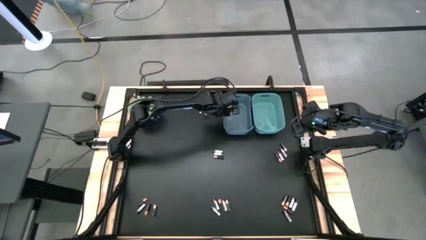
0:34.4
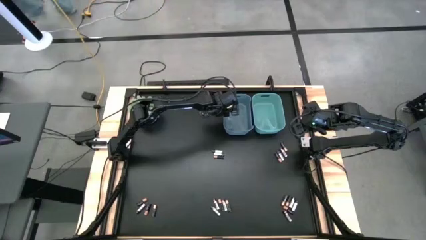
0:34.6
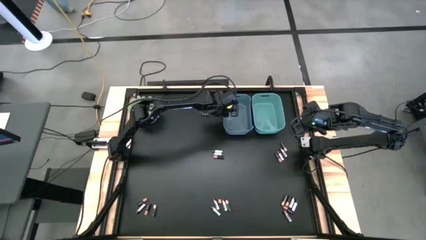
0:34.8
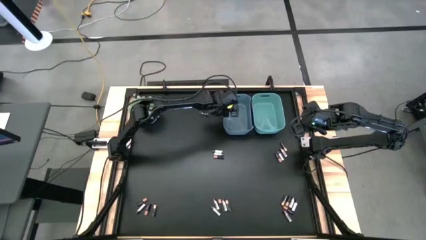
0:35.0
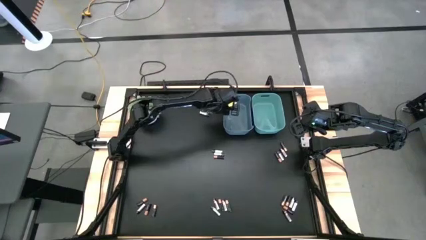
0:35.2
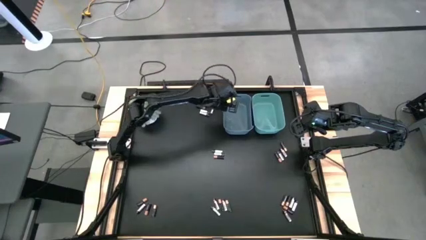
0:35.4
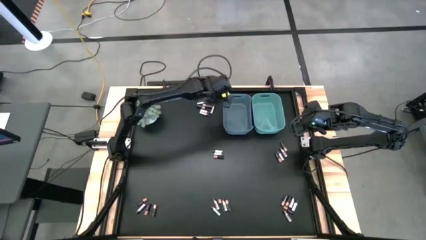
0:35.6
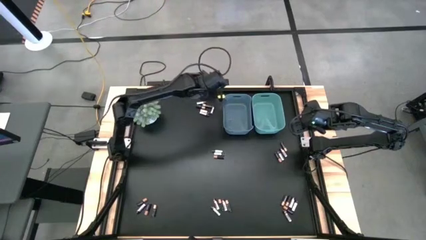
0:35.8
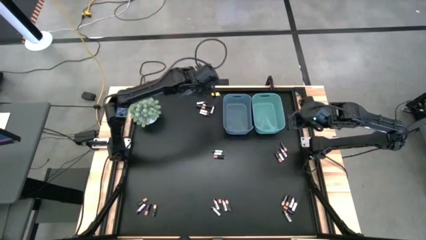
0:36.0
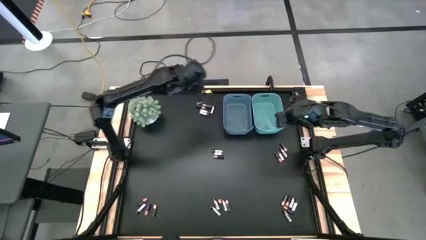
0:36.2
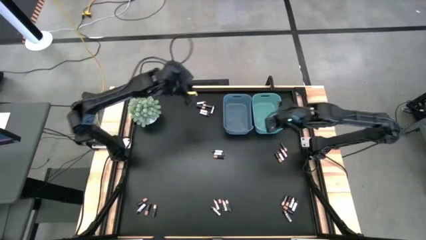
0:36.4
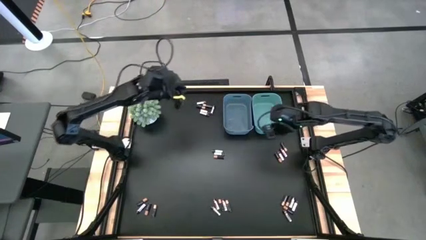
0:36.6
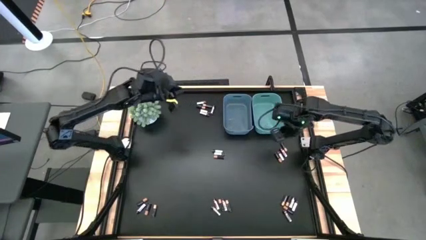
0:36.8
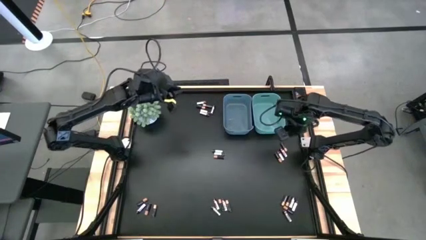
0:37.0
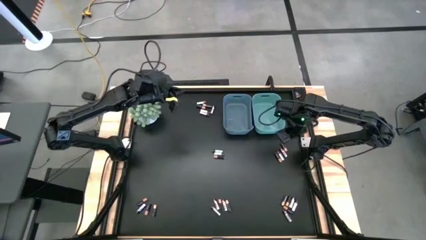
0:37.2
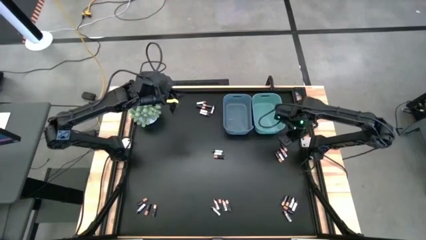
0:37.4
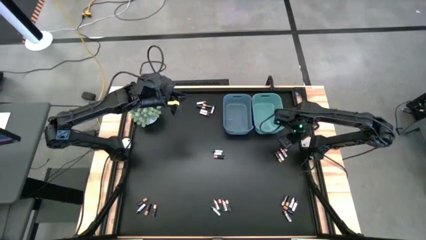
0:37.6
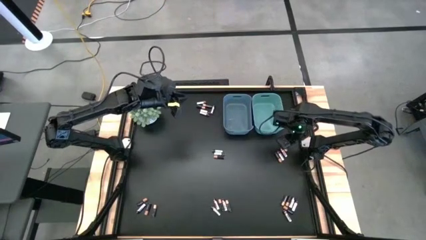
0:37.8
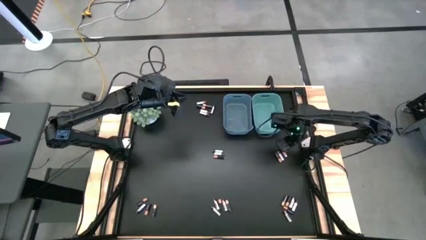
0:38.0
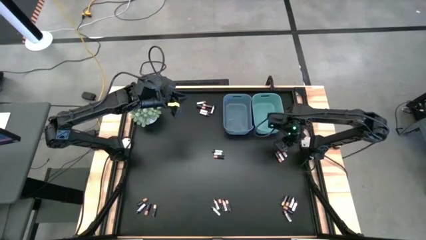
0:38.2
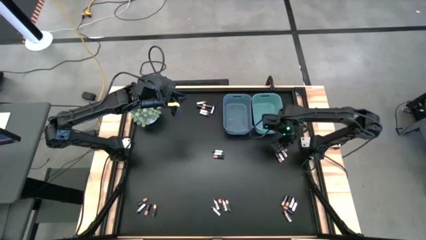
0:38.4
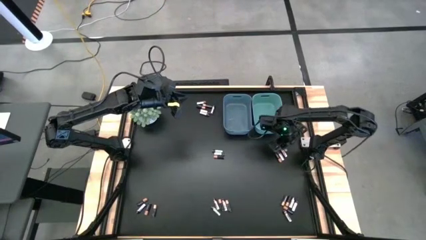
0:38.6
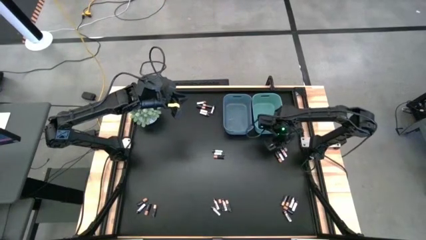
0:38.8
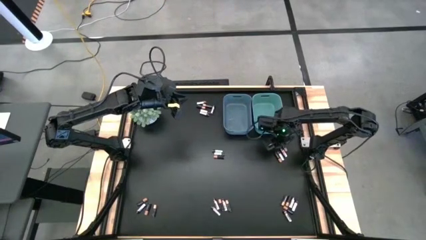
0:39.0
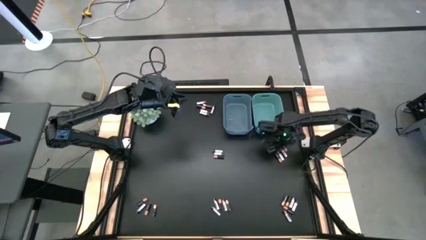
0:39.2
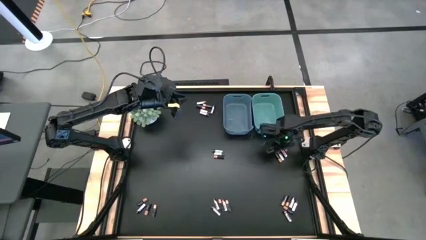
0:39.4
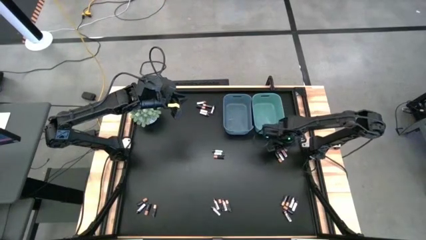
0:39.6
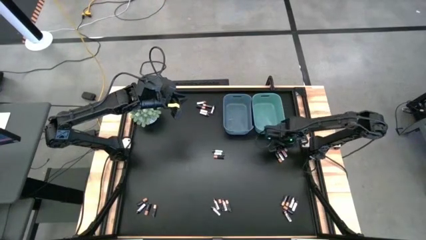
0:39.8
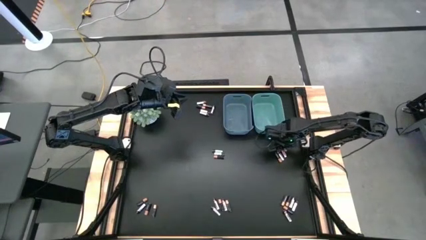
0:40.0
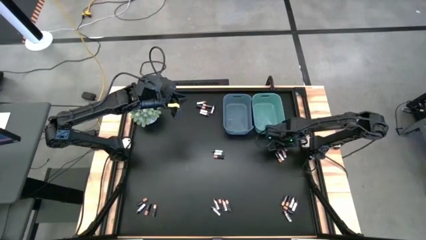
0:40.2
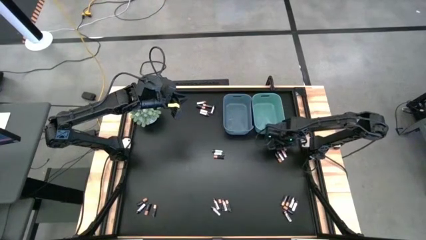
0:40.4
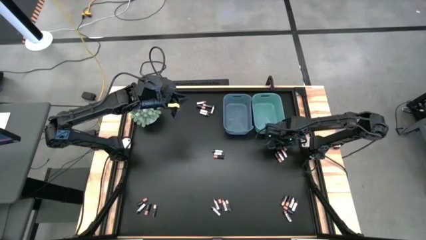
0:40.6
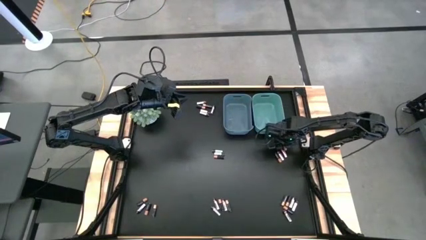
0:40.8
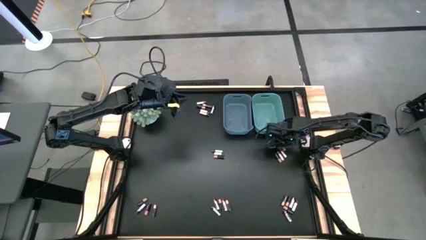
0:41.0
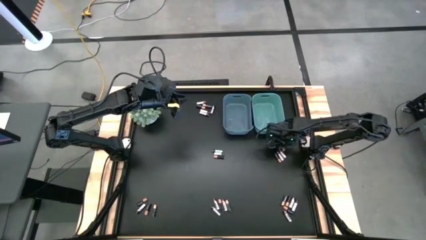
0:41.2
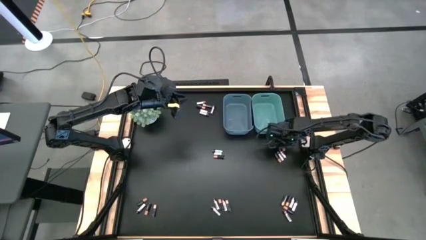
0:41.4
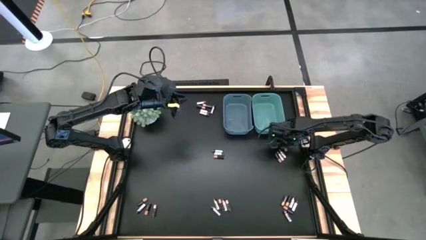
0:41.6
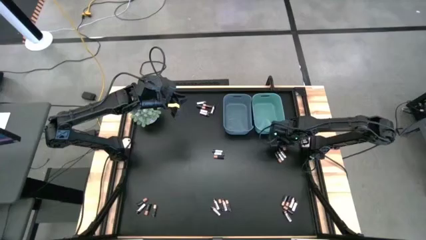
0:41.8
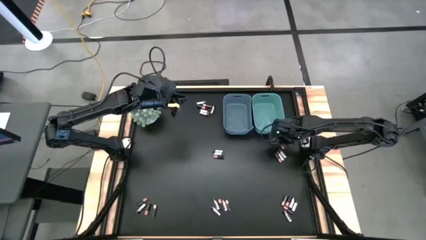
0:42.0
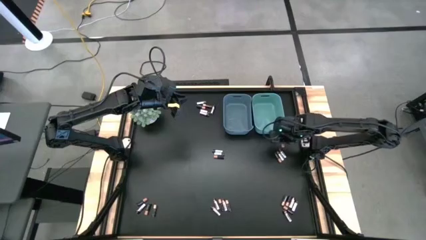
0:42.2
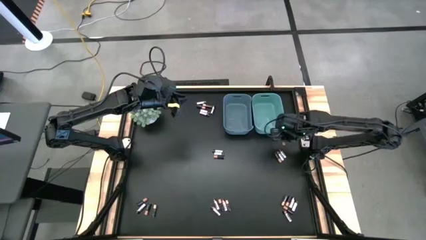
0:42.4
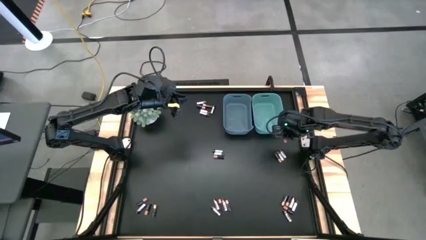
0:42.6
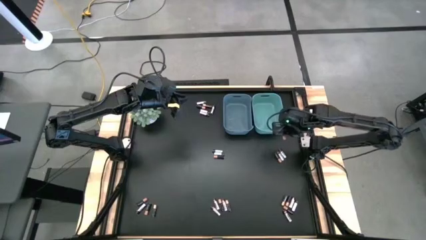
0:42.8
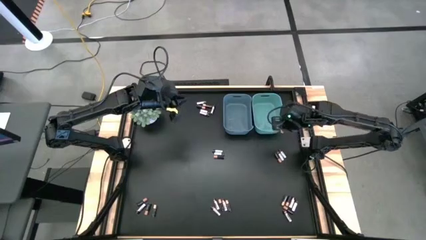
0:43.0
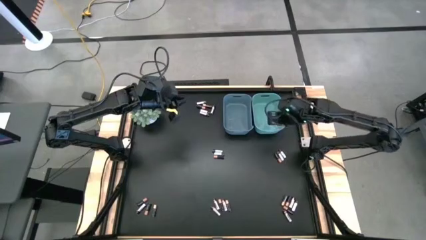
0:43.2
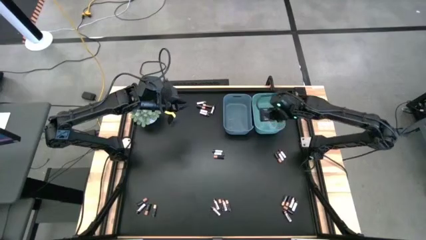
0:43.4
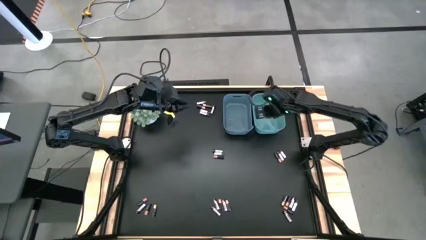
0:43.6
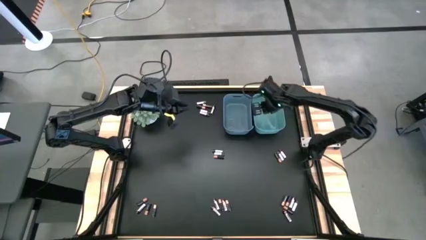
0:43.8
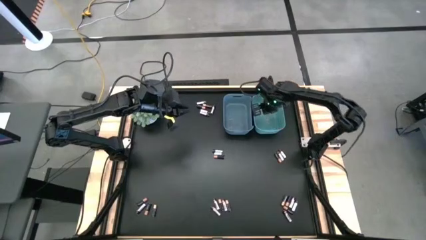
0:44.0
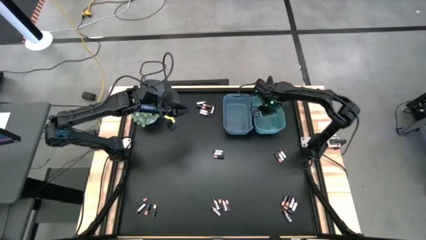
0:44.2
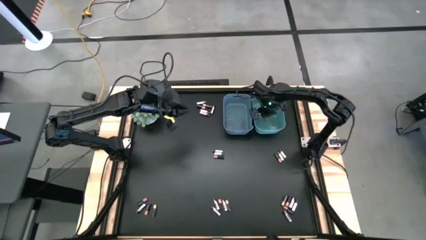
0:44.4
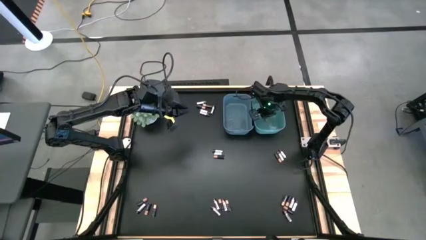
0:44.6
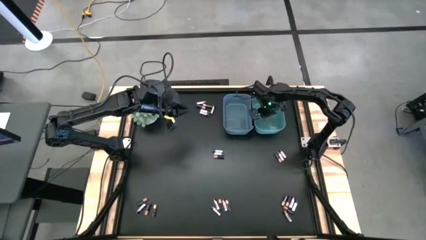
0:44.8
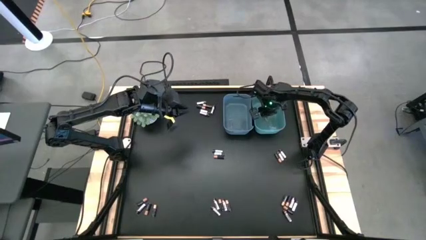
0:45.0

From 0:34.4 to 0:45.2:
Task: Sort batteries
Put the black battery into the green bin

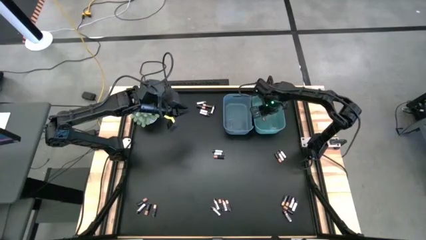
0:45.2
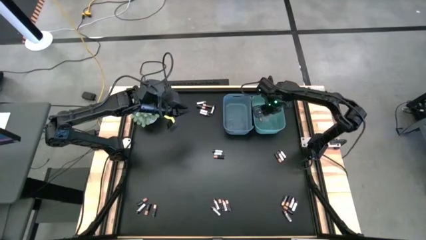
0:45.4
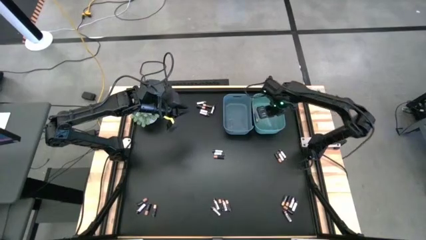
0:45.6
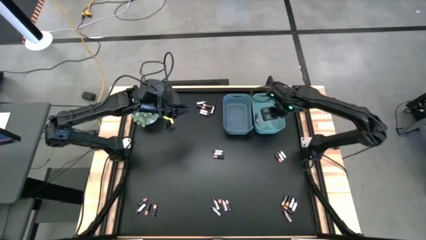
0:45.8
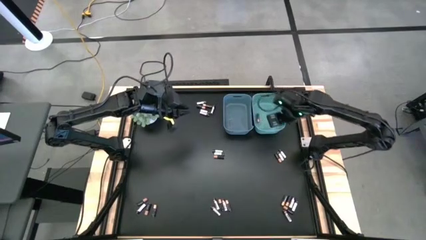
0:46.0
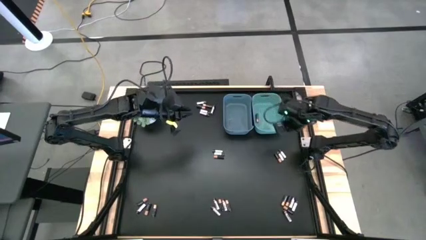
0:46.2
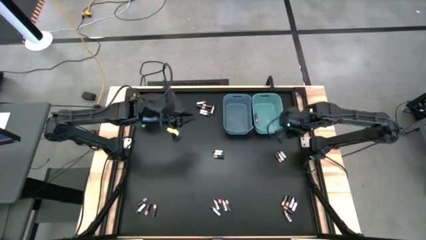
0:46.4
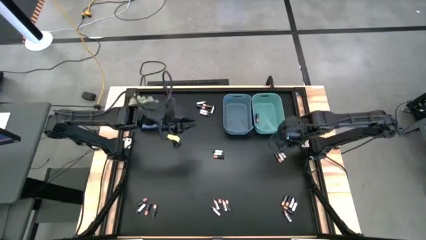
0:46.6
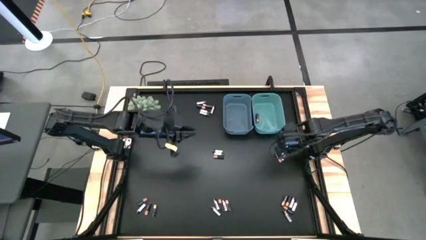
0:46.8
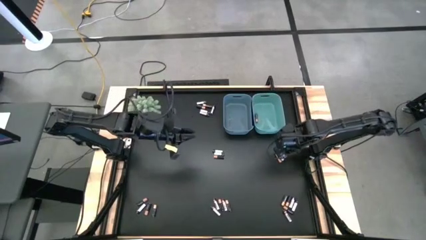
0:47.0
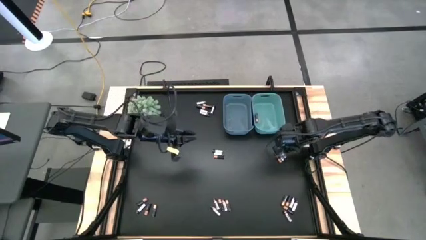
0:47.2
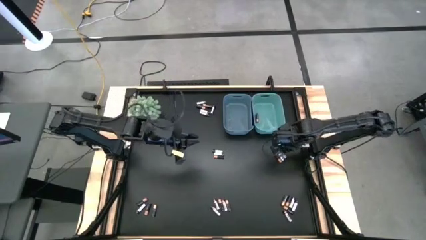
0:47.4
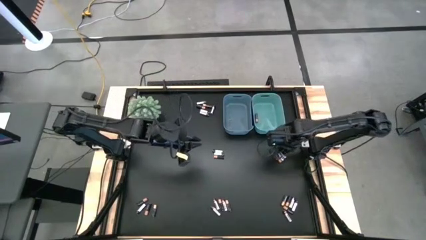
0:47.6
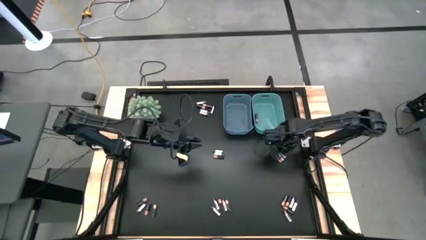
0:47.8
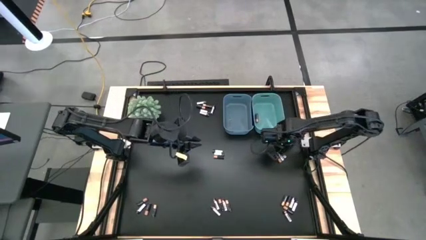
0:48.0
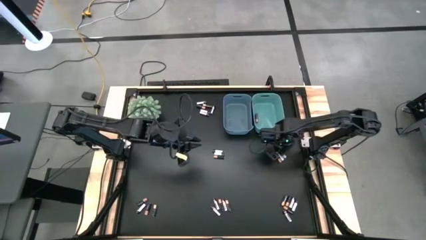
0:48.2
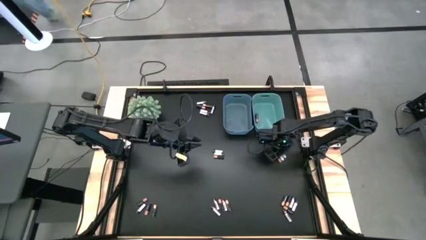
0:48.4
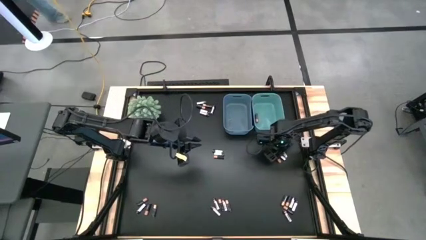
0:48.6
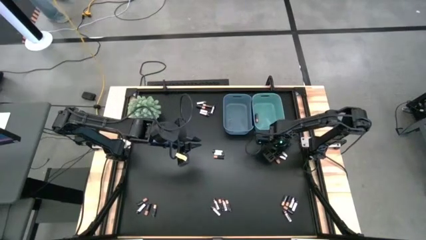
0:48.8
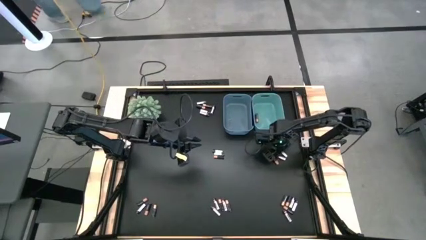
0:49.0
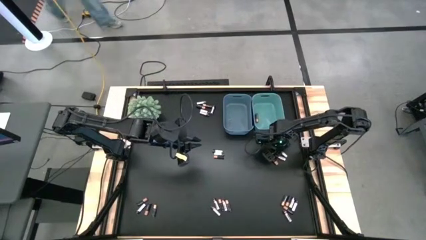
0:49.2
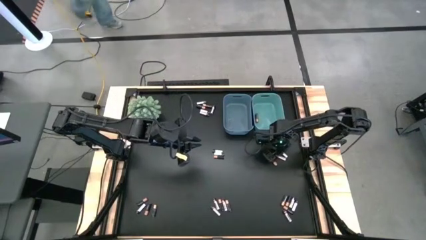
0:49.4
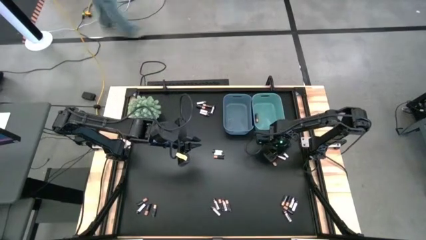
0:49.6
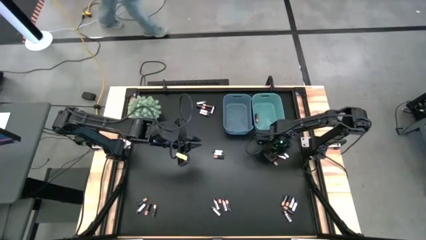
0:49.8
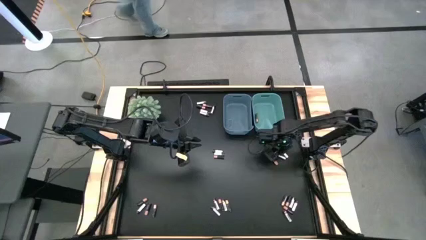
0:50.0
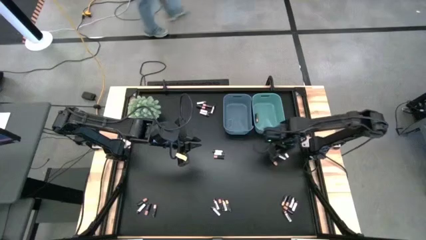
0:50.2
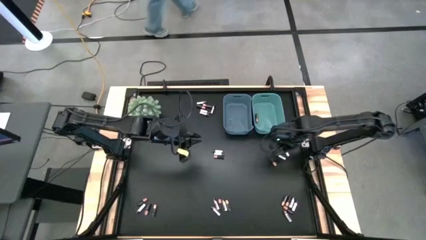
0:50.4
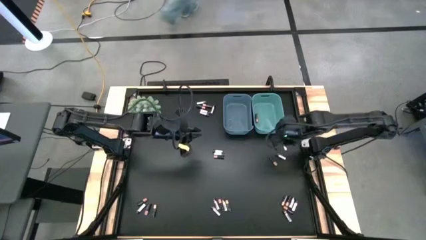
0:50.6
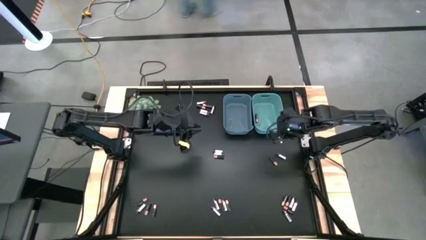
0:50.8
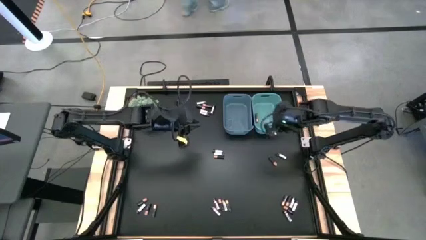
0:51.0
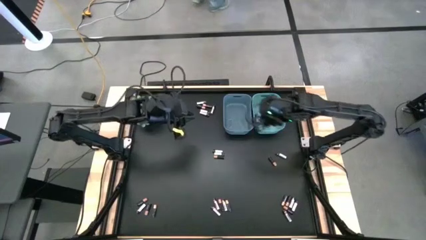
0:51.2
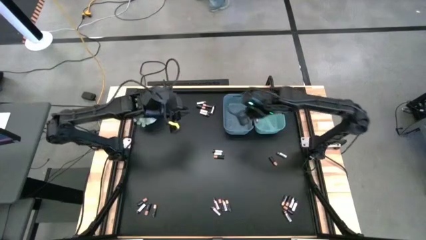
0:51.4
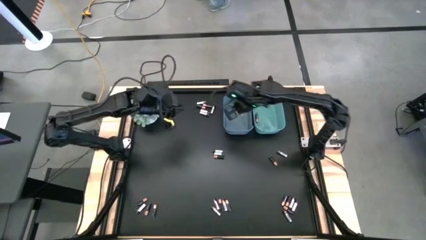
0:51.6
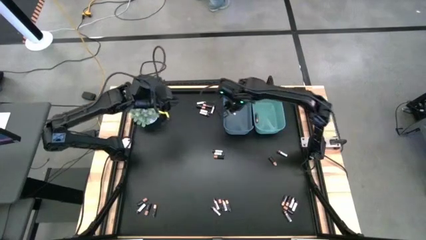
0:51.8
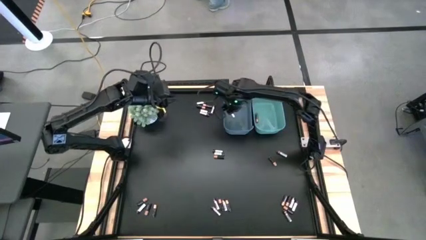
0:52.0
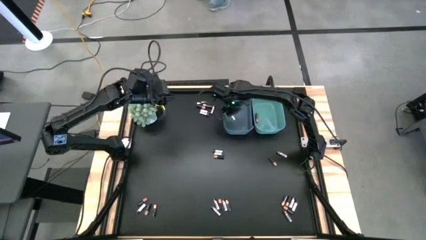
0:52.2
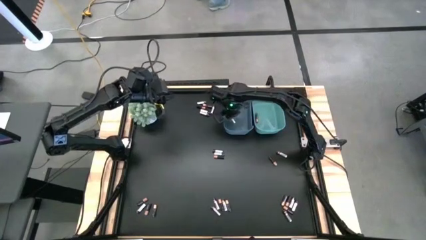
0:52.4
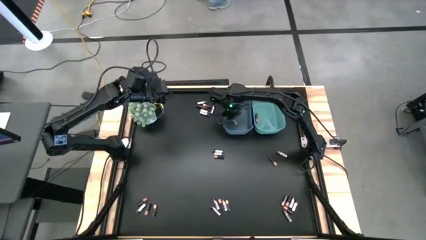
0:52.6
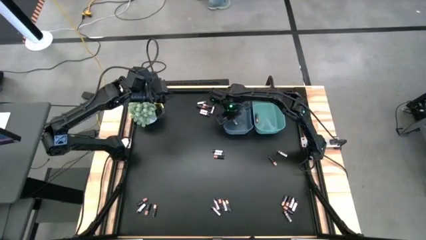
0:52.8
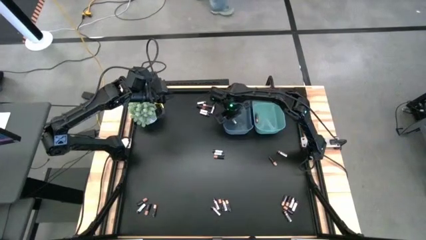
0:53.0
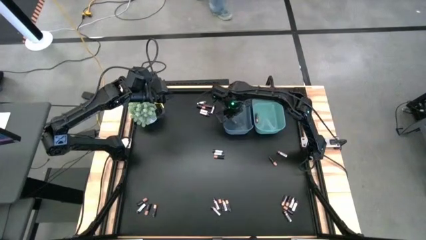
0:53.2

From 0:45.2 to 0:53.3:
Put the silver battery into the blue bin
